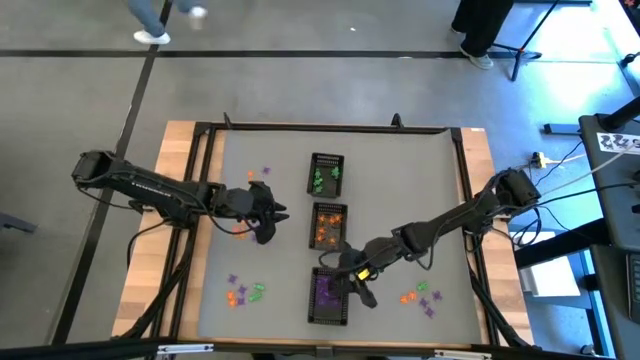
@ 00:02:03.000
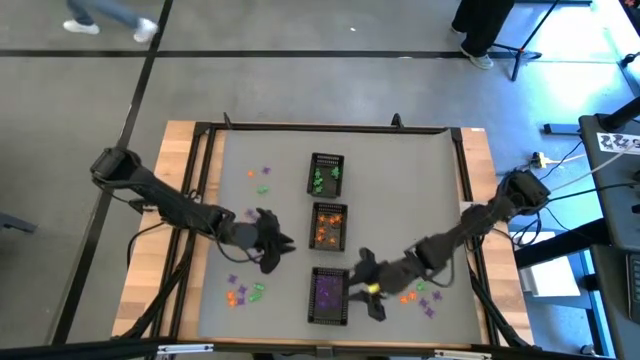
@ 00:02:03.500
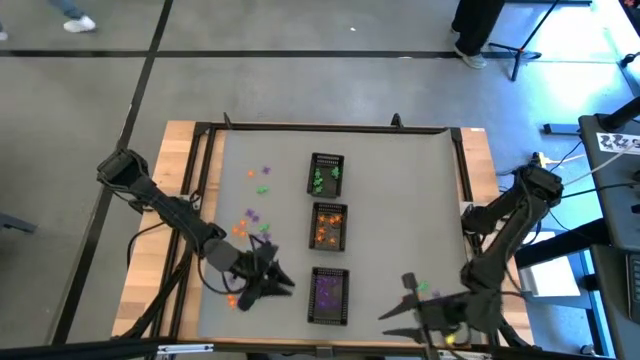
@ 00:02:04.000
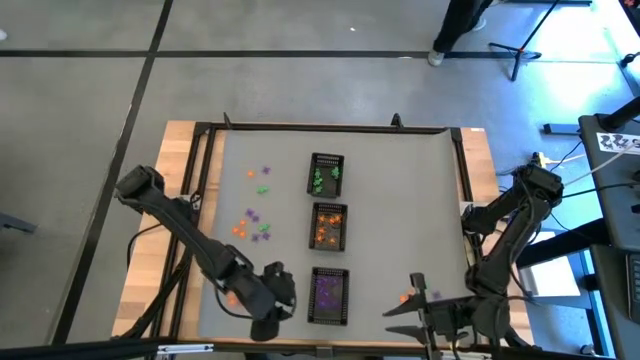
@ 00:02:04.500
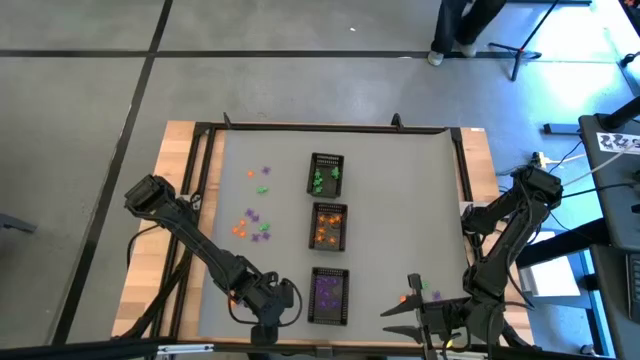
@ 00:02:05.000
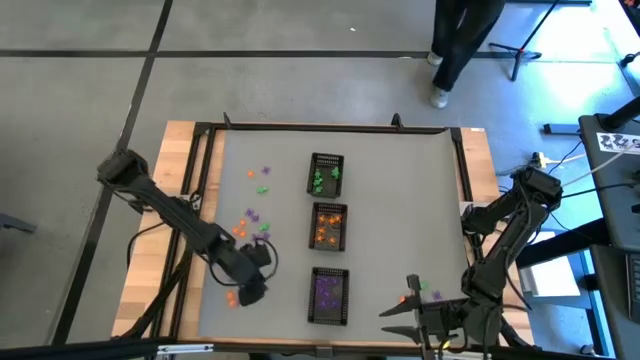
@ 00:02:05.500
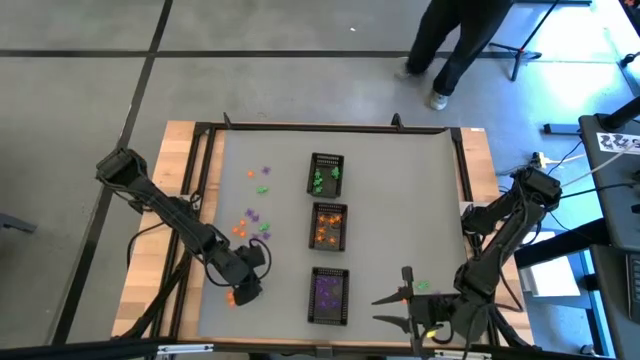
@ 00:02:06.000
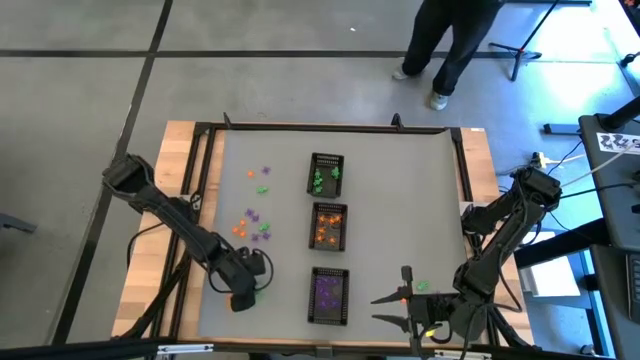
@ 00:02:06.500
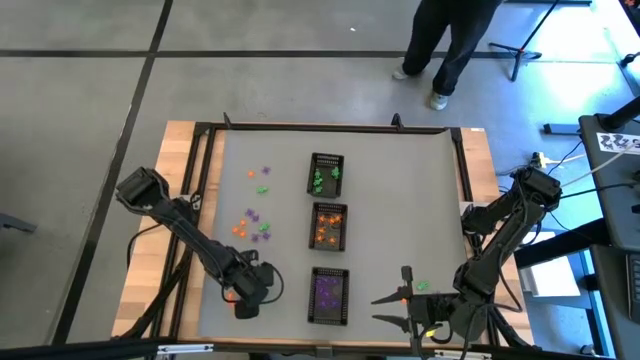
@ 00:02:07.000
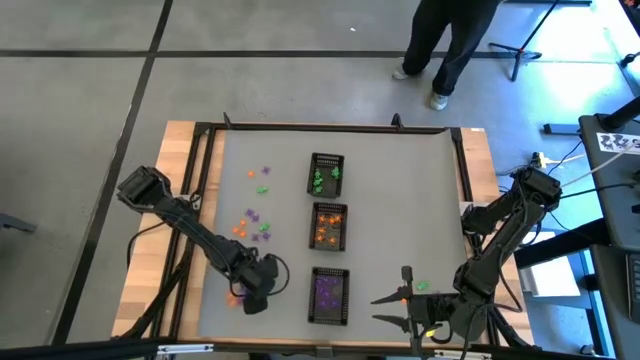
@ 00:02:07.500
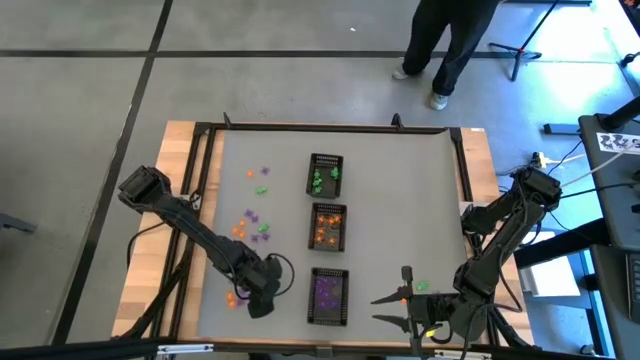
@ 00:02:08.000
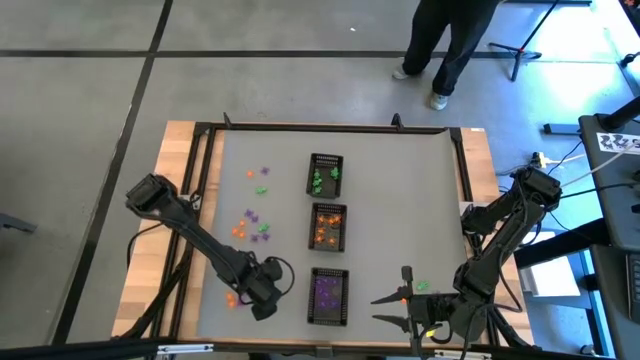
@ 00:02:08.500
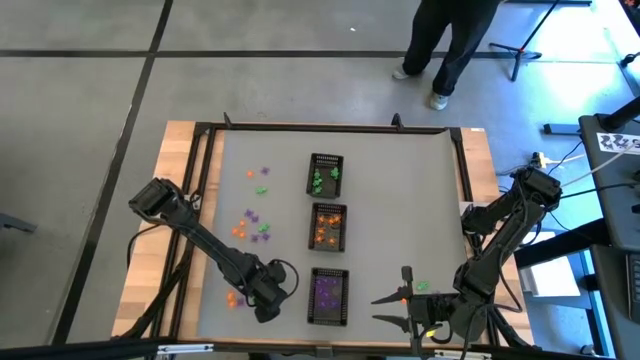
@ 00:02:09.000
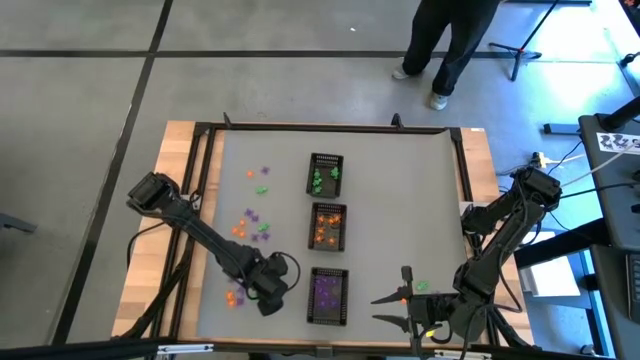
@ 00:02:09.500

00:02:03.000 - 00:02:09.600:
Task: Sort Halloween decoration
Put the green skeleton toy into the top black bin

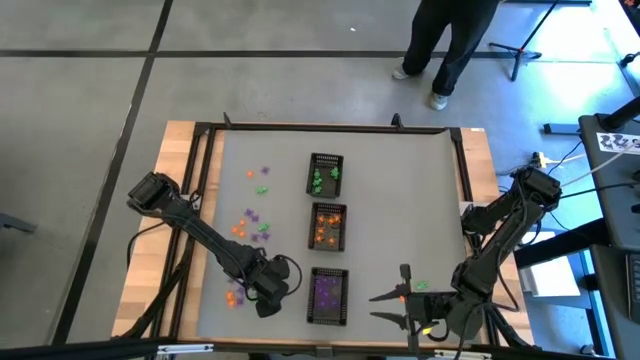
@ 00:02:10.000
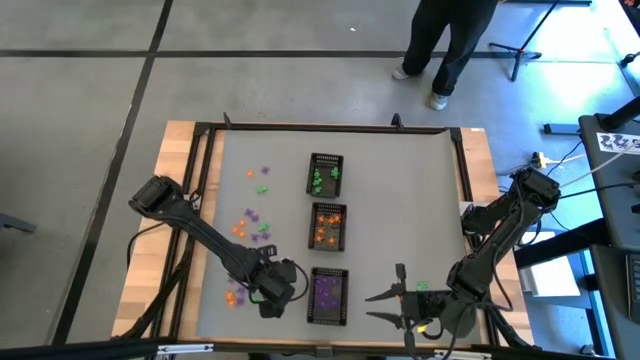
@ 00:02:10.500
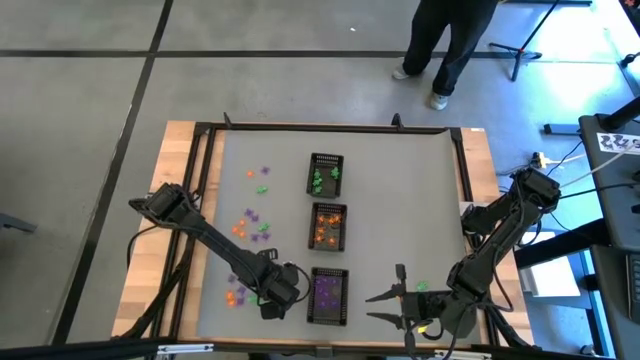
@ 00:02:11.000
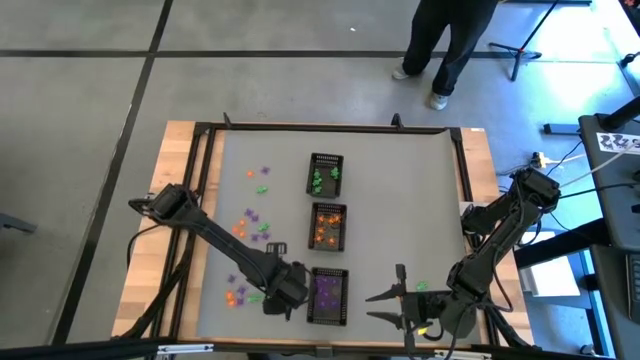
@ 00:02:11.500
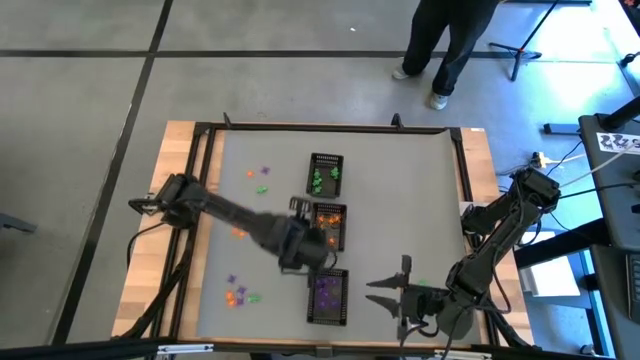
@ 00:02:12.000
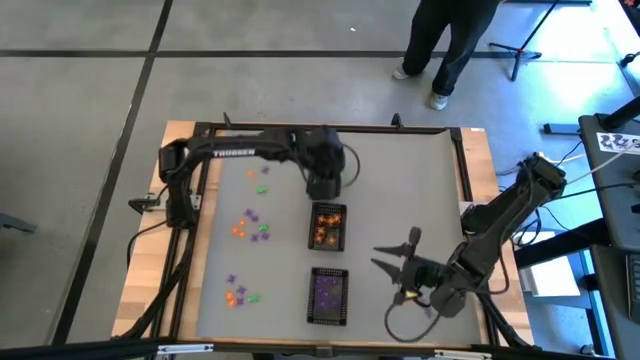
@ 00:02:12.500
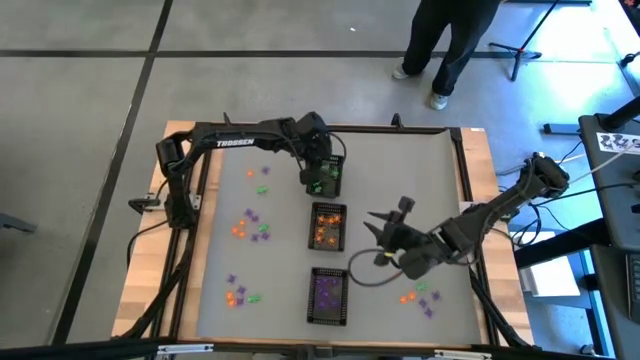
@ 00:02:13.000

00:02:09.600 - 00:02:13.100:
Put the green skeleton toy into the top black bin

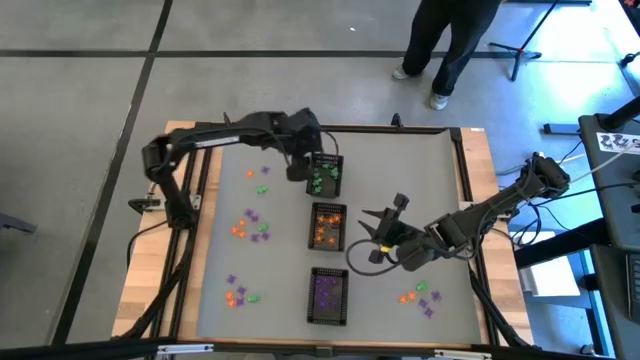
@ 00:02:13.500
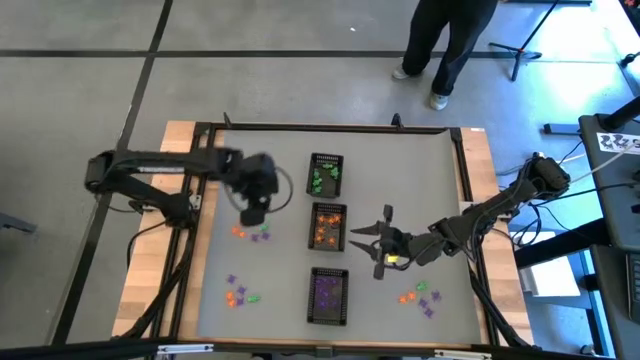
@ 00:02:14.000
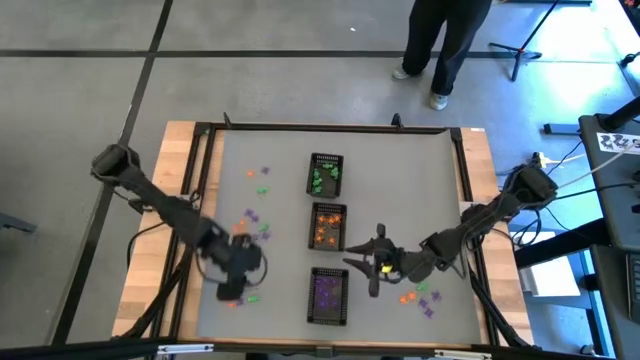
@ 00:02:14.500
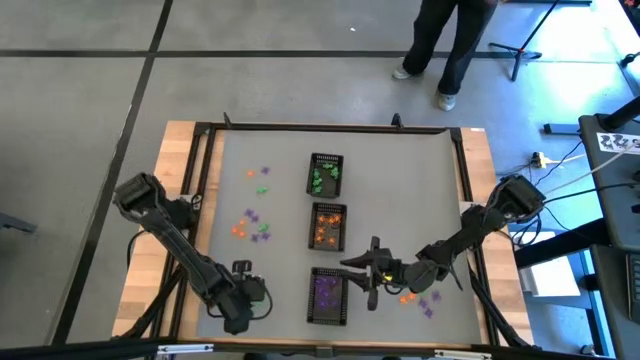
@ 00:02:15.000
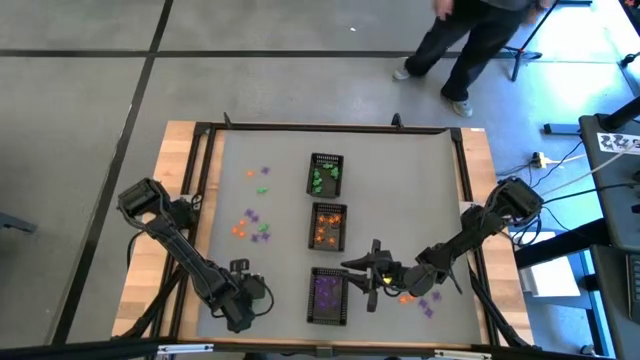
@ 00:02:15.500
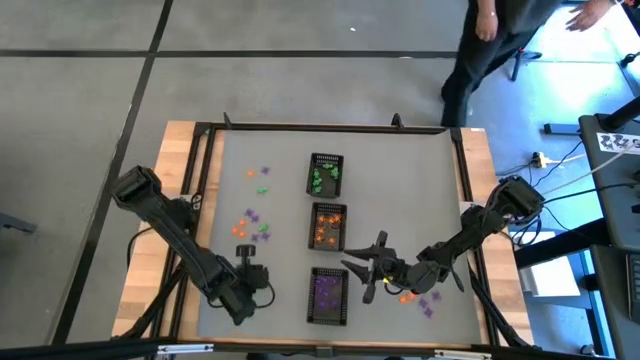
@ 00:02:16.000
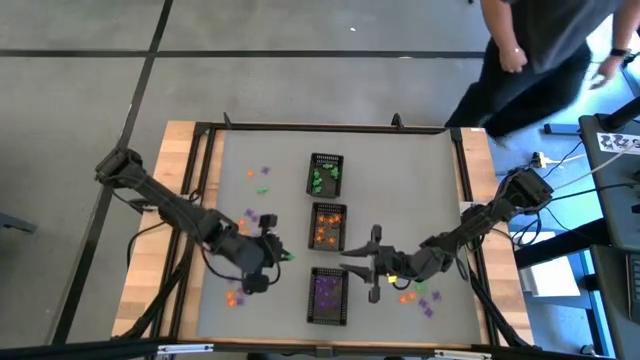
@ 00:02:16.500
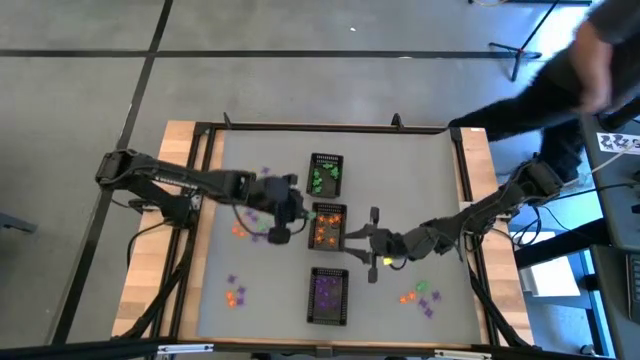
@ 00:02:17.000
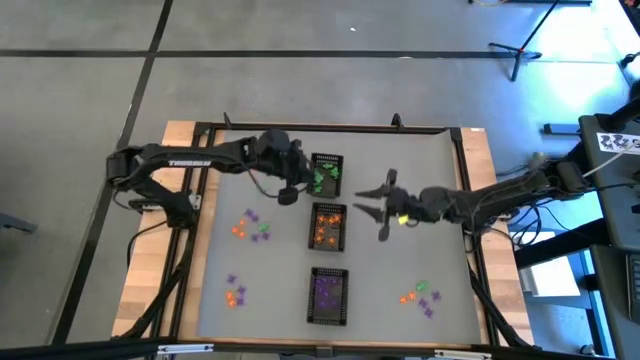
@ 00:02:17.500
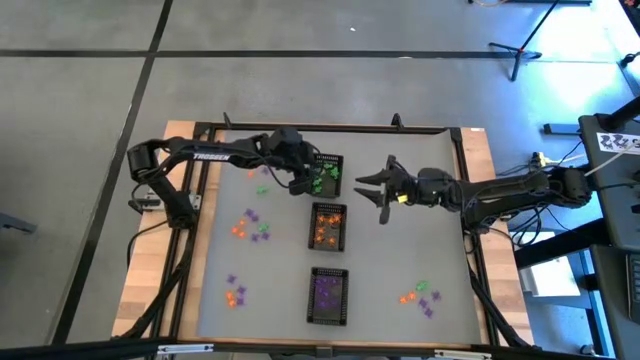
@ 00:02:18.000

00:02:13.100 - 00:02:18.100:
Put the green skeleton toy into the top black bin

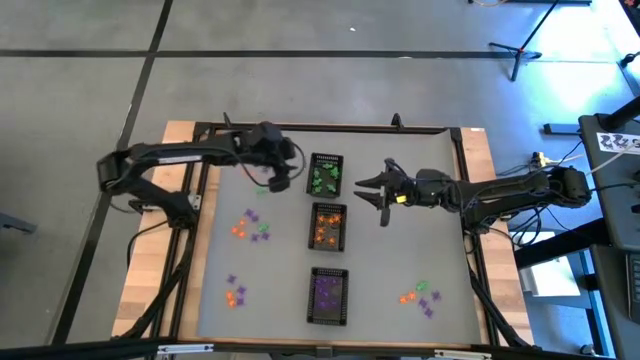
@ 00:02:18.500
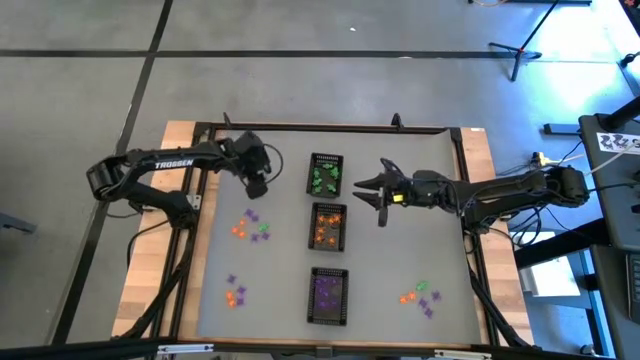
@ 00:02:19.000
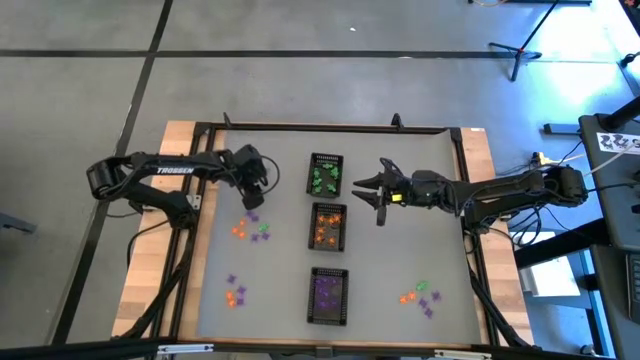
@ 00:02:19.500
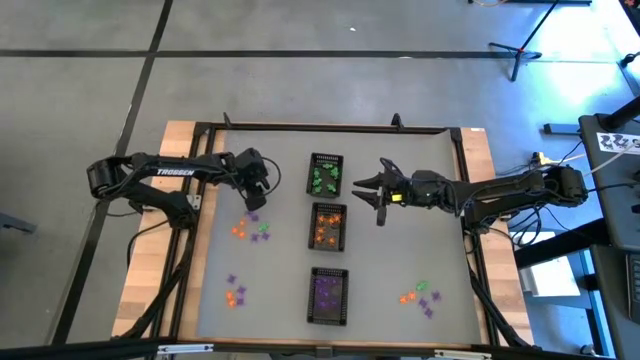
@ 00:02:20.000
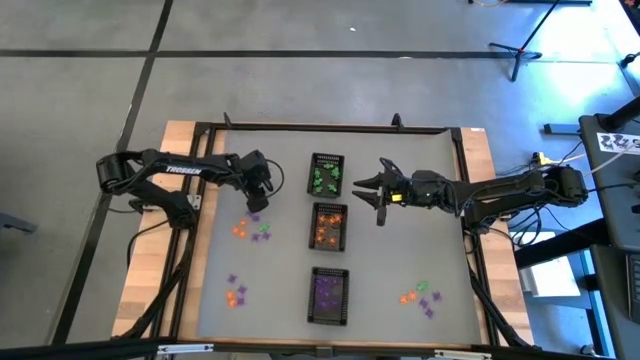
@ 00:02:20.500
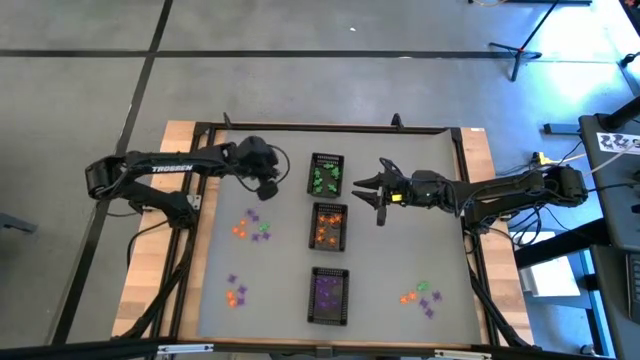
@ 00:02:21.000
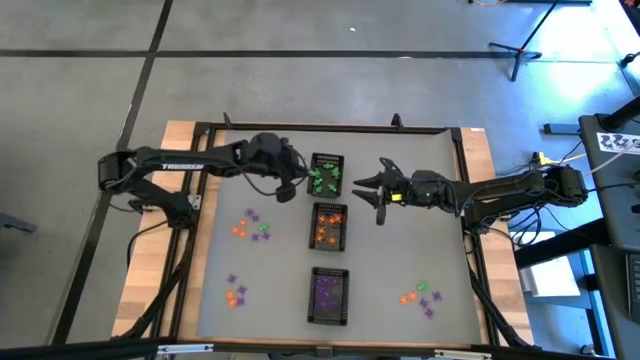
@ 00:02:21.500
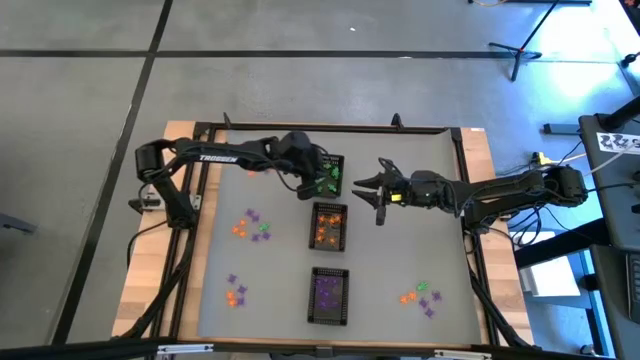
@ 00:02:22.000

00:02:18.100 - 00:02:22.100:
Put the green skeleton toy into the top black bin

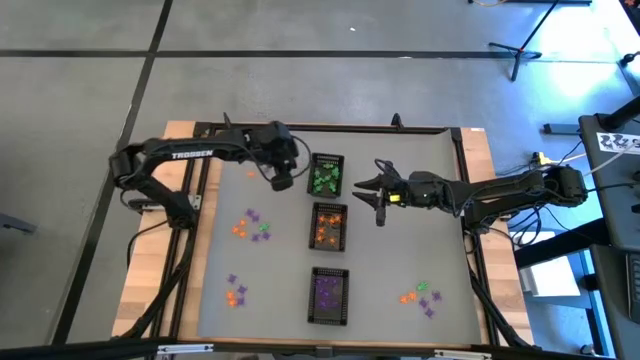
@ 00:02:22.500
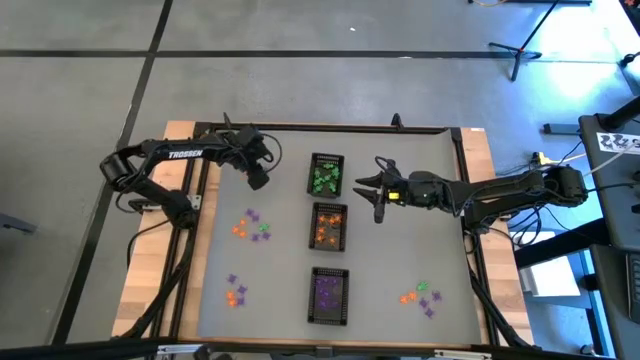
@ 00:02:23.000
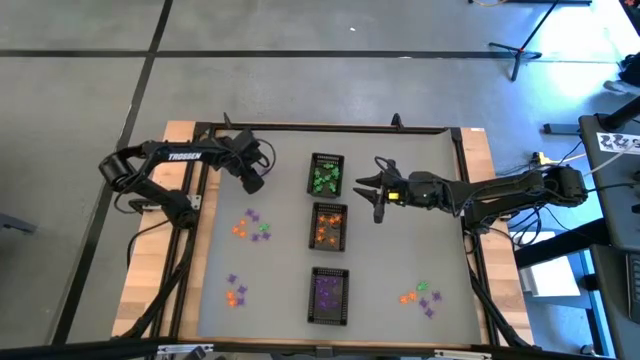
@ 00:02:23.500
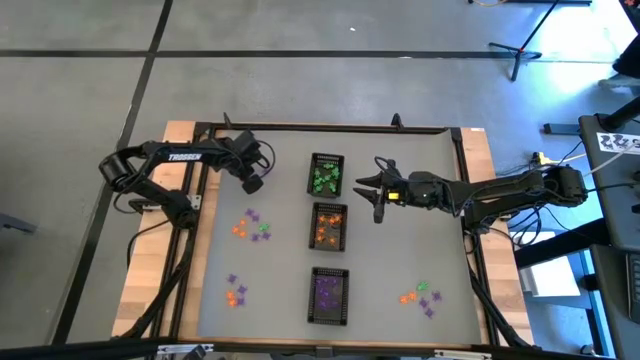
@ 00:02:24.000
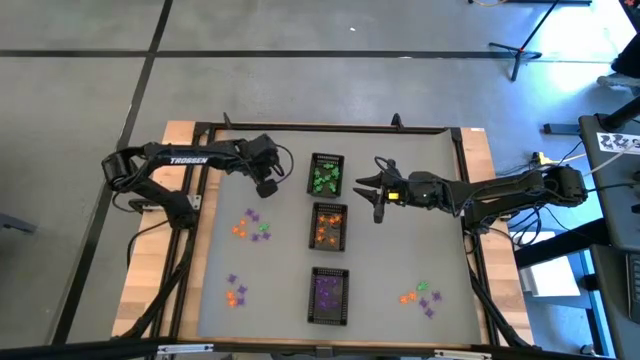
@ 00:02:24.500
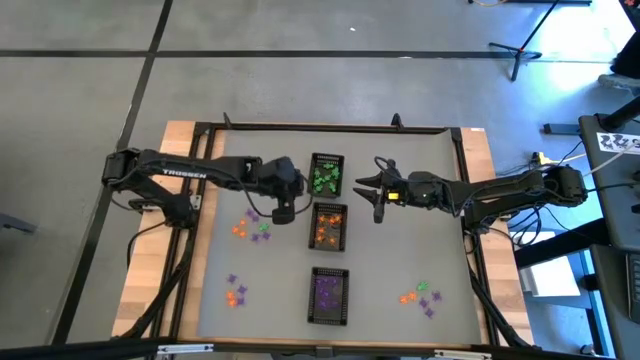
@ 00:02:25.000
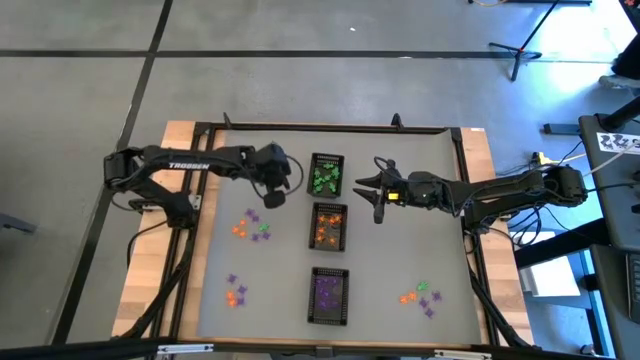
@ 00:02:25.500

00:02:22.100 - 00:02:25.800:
Put the orange spider toy into the middle black bin
